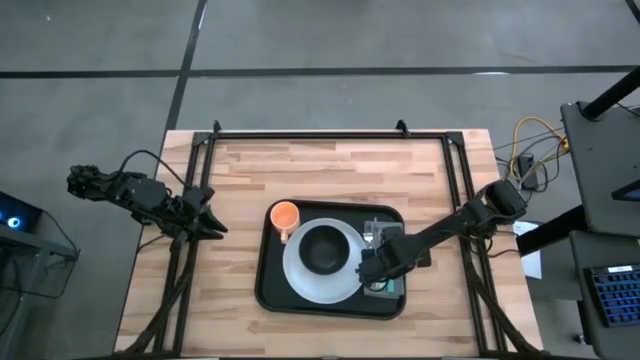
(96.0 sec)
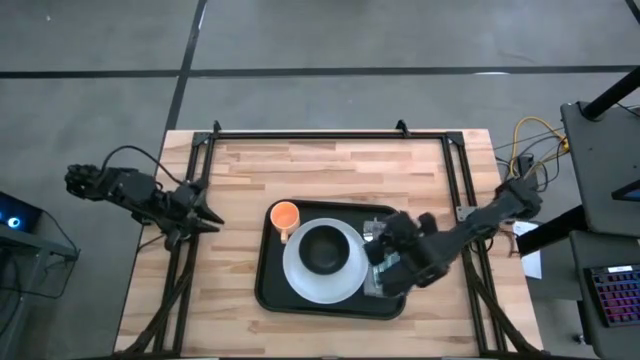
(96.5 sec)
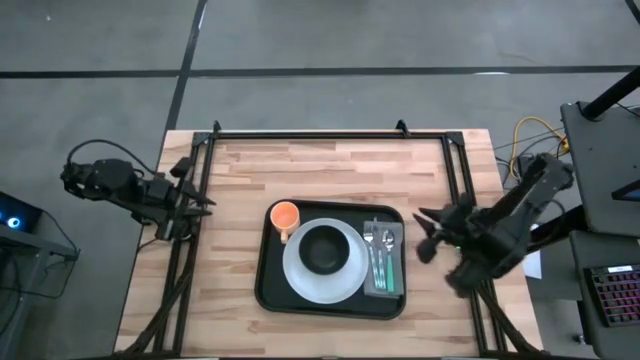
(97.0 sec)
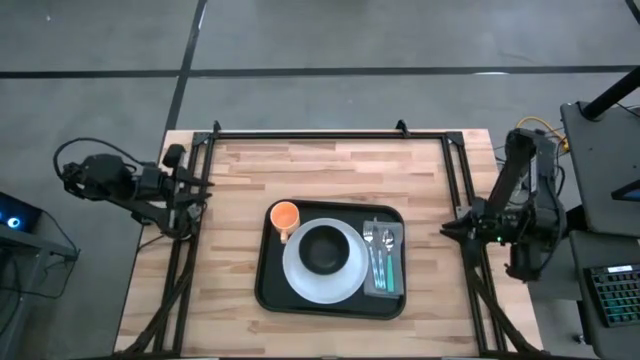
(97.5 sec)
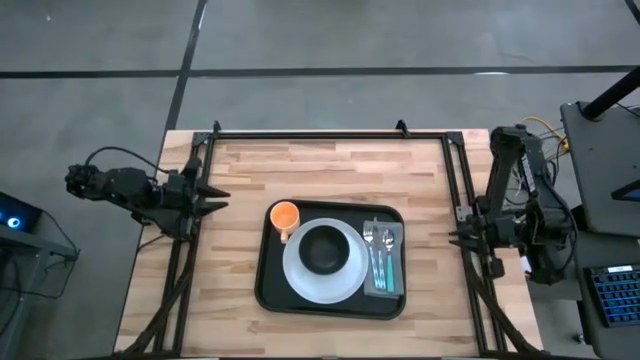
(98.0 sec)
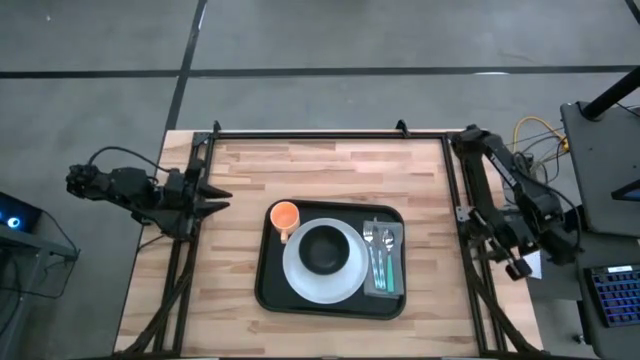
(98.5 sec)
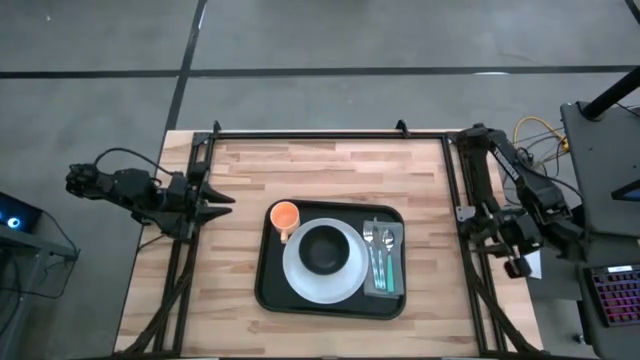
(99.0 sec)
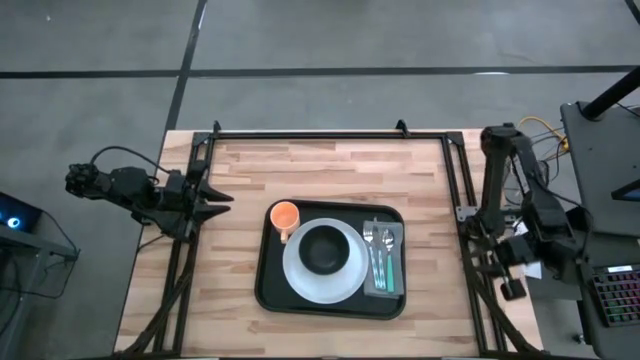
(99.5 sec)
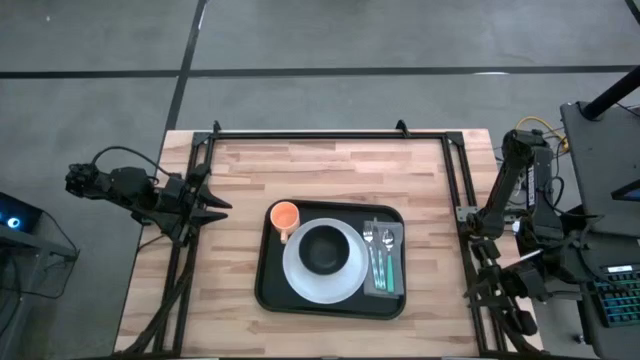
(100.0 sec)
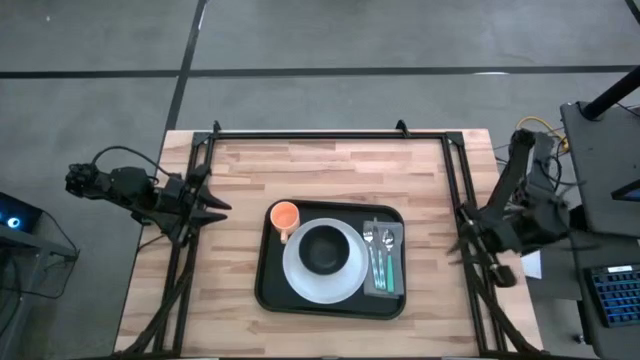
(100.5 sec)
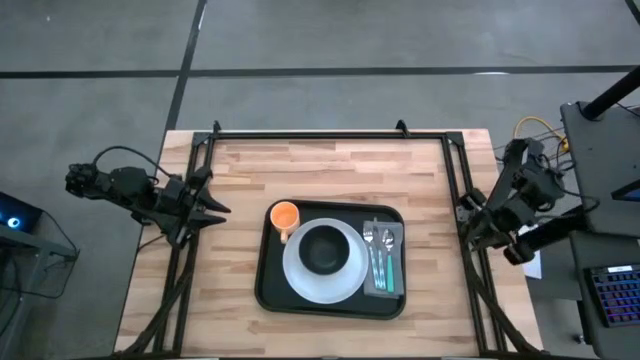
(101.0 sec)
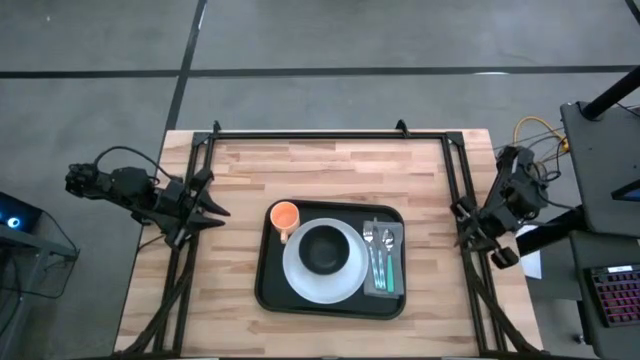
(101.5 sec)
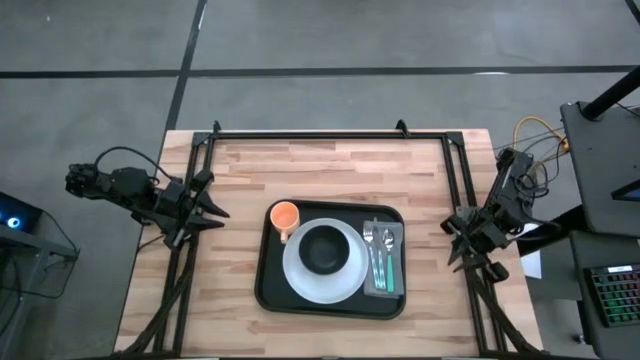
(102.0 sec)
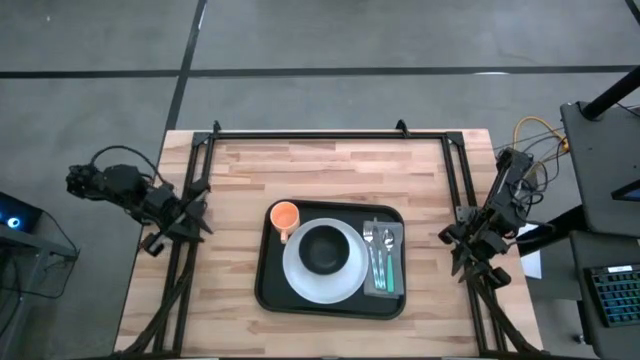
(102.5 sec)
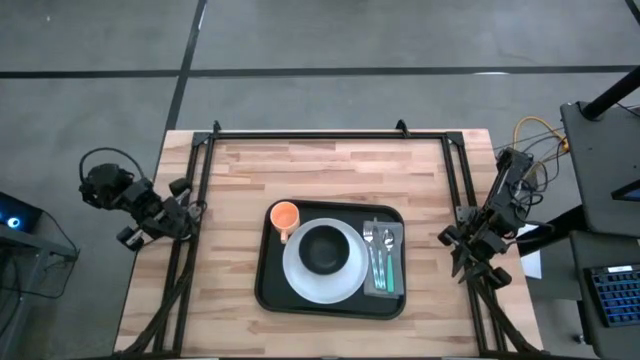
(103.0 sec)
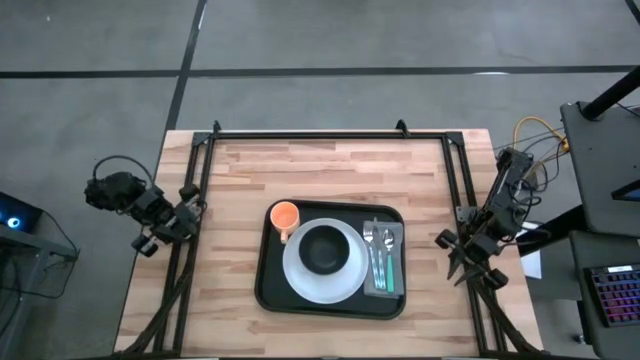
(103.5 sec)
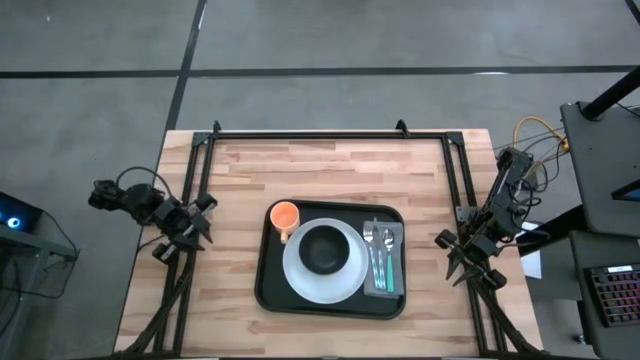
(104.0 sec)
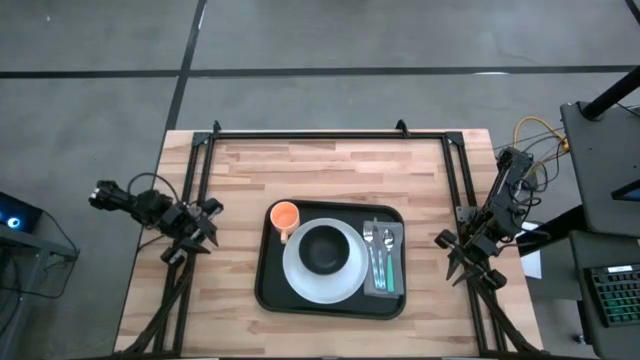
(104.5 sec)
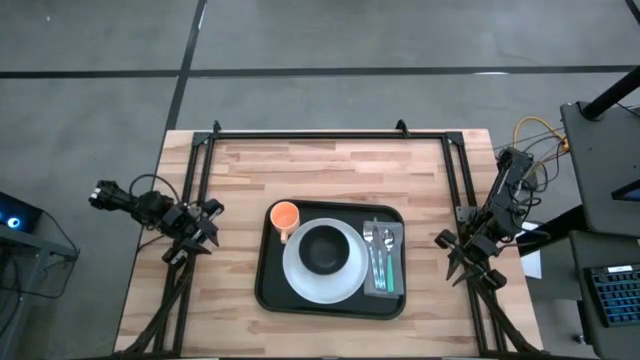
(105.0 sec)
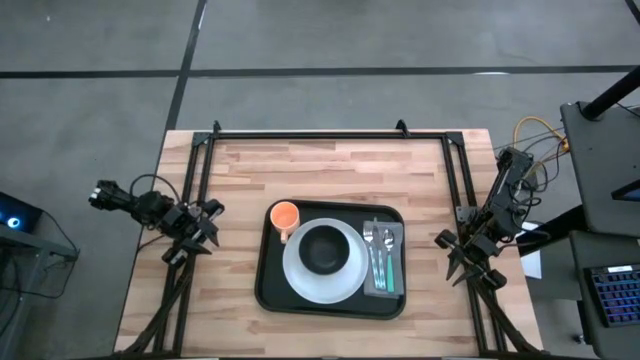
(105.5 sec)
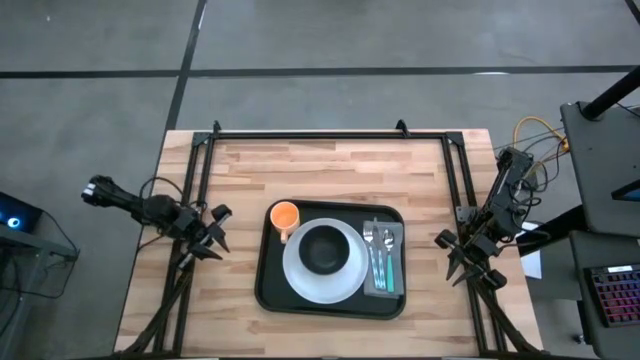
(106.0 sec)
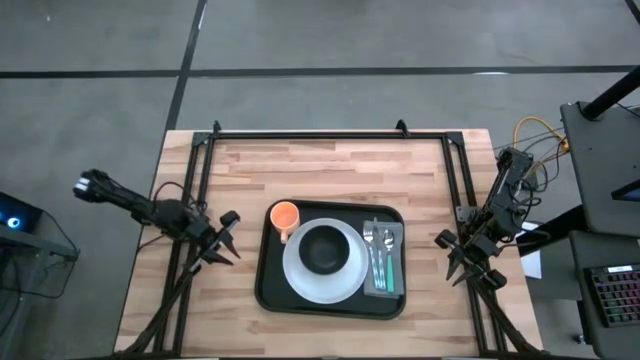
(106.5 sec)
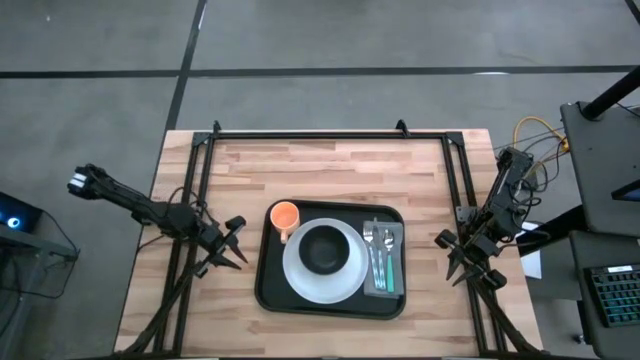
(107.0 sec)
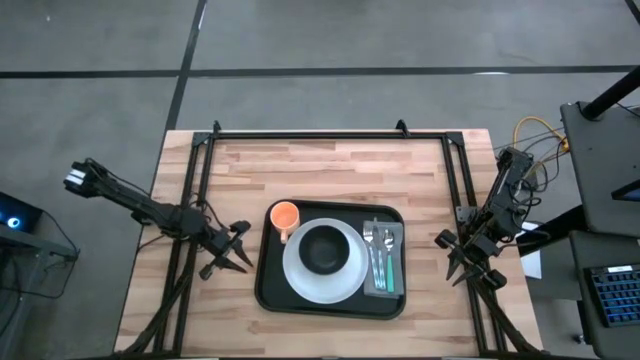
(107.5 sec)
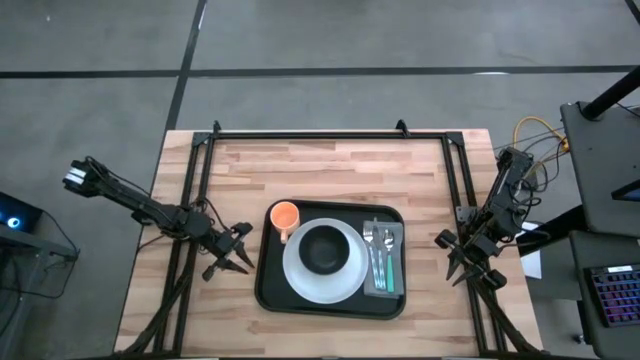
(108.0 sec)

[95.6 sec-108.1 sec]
Task: Set up tray
Return to Home Position

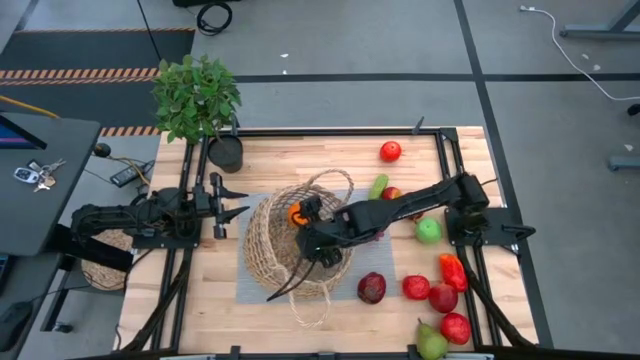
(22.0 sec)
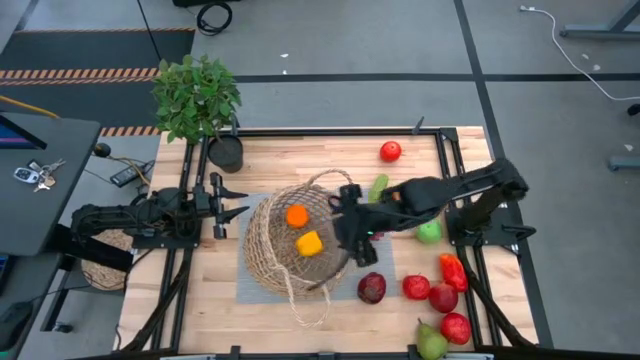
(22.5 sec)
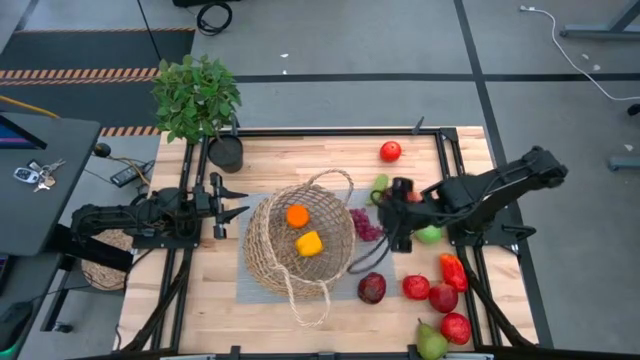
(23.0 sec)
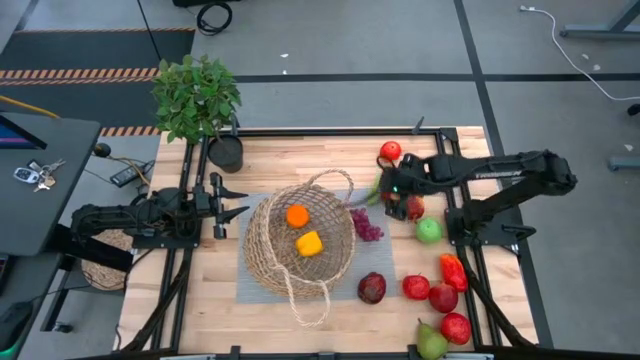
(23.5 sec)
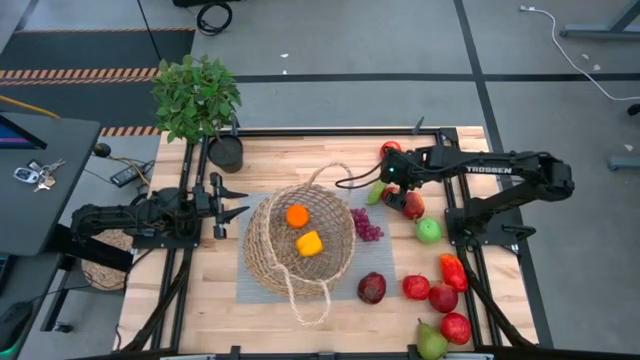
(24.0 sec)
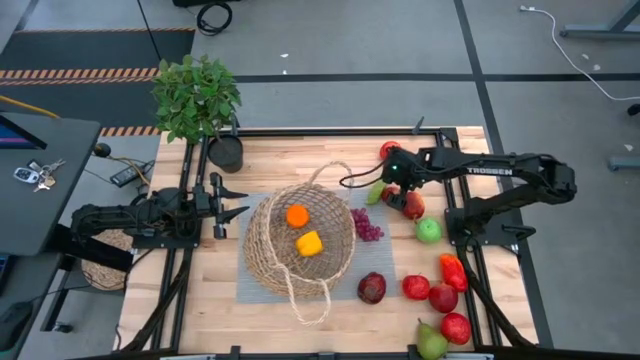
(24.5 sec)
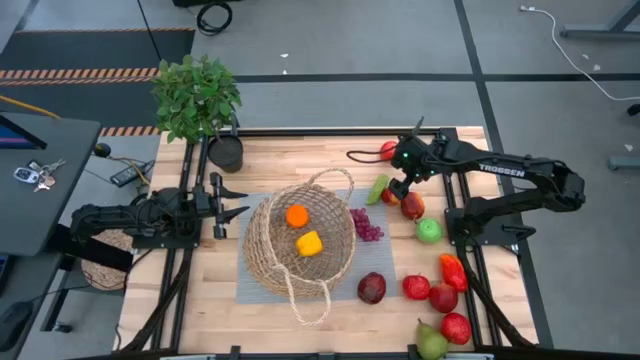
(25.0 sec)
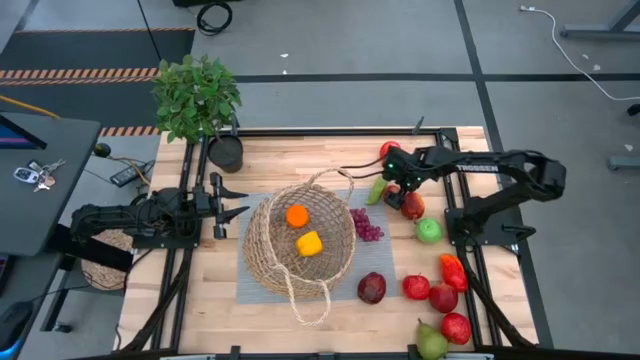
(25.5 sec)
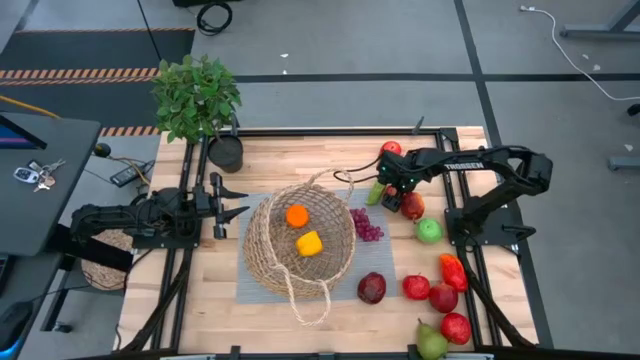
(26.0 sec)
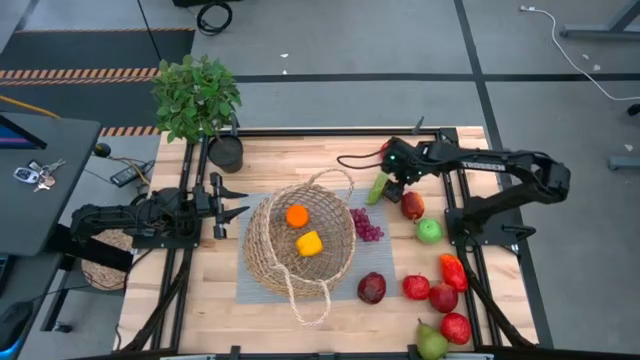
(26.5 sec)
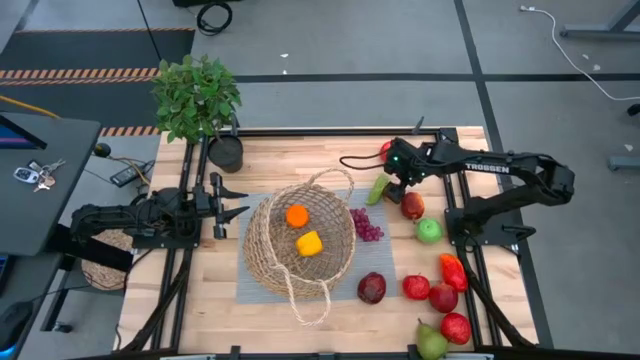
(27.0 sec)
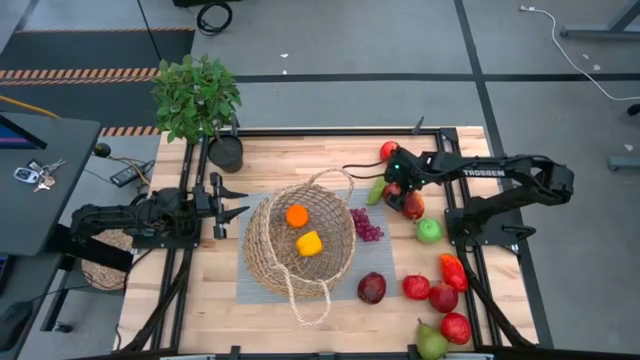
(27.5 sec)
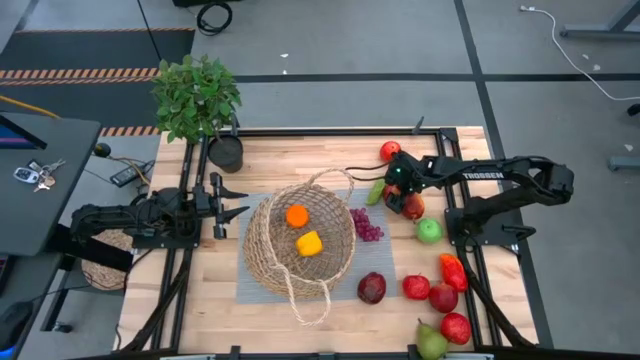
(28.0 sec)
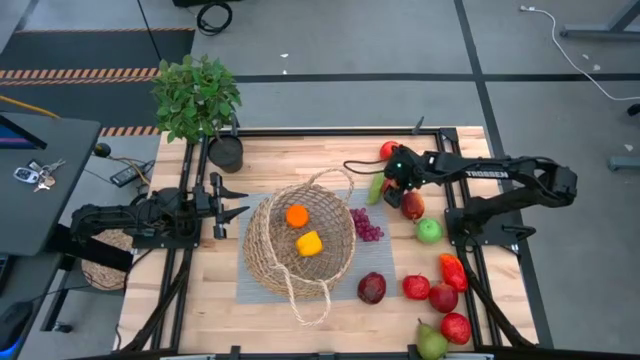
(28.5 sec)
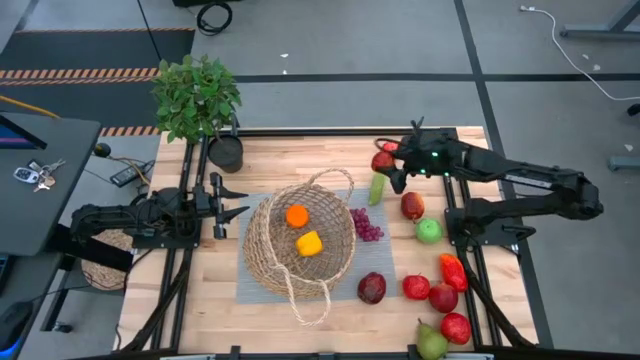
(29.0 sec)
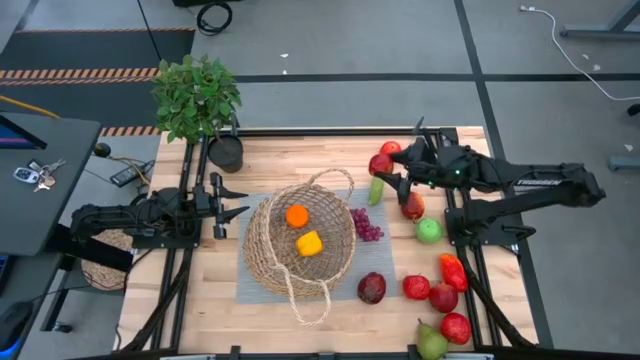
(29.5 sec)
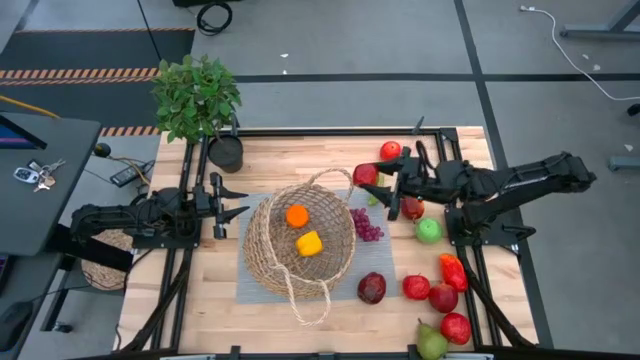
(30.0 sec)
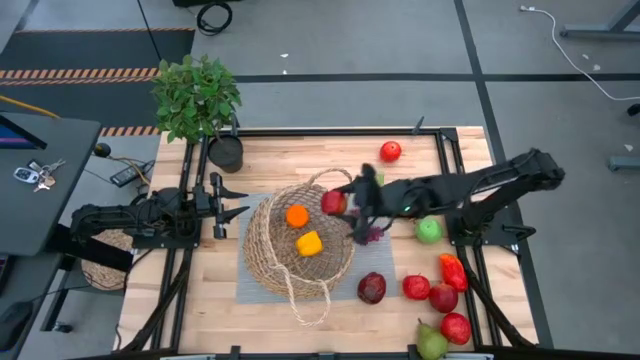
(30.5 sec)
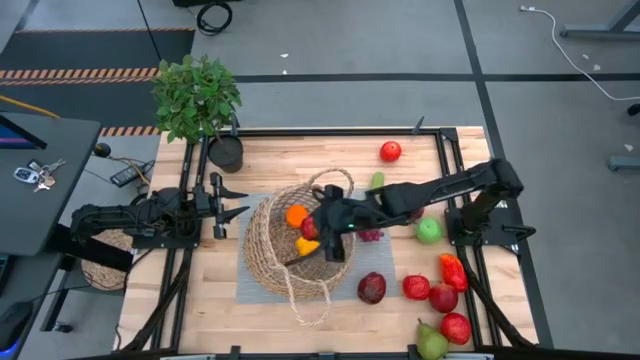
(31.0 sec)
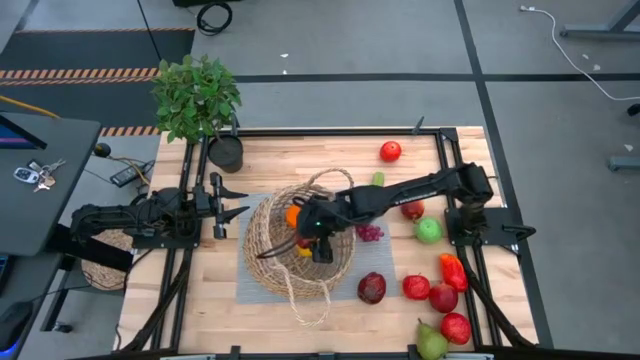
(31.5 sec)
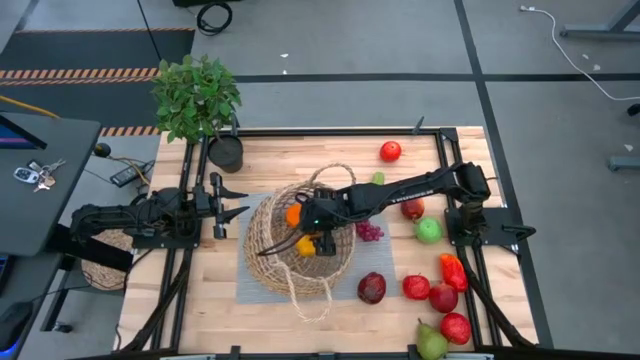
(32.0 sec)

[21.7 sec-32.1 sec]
Task: Build produce basket
Put the red apple in the basket
